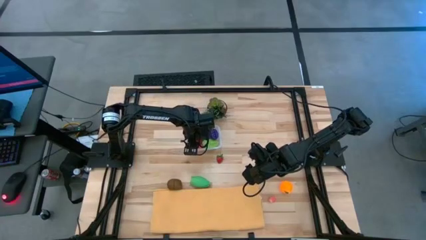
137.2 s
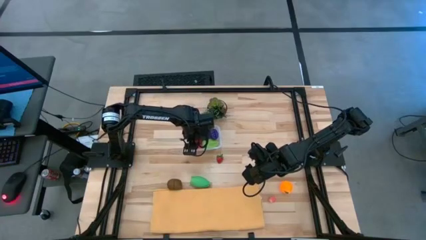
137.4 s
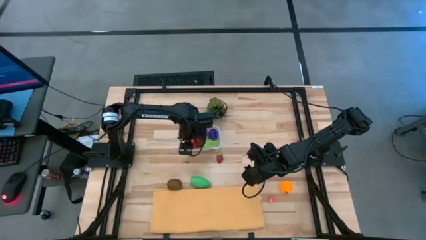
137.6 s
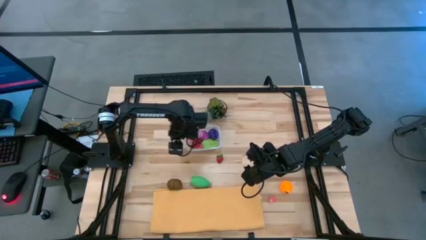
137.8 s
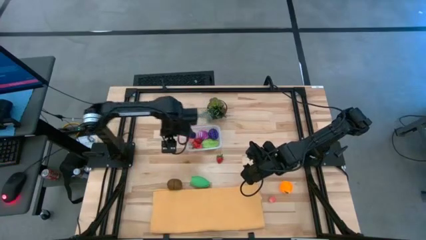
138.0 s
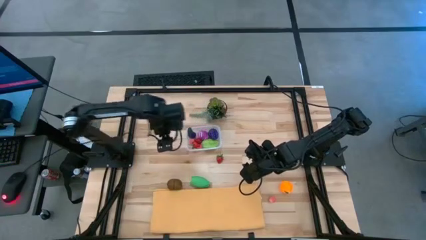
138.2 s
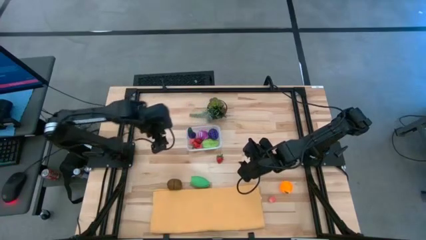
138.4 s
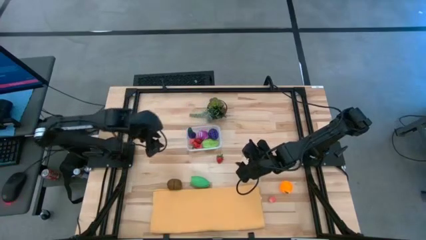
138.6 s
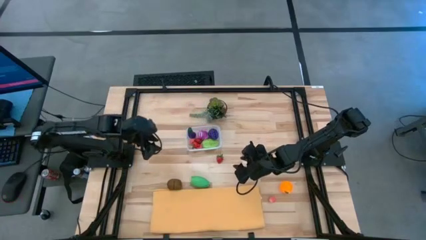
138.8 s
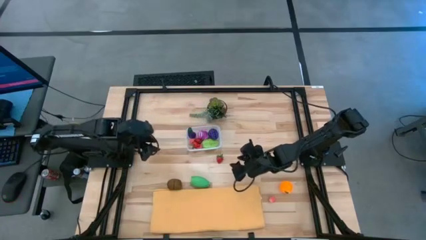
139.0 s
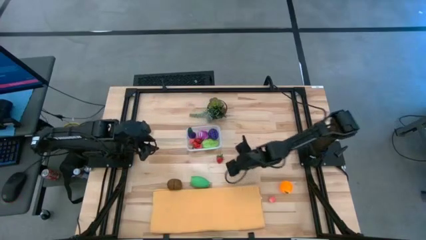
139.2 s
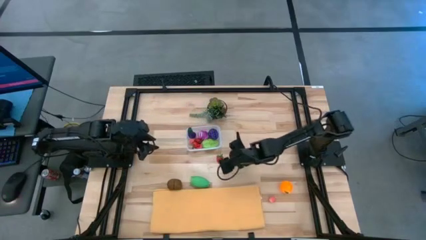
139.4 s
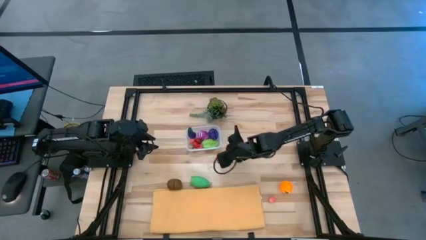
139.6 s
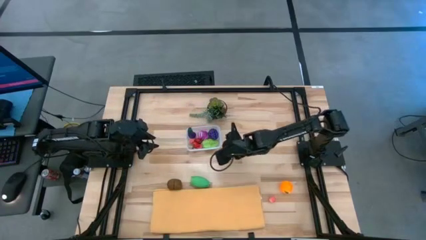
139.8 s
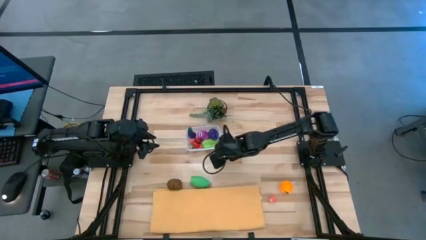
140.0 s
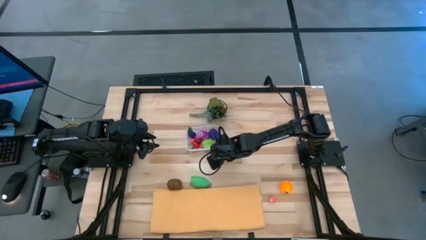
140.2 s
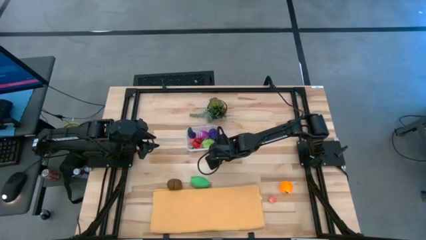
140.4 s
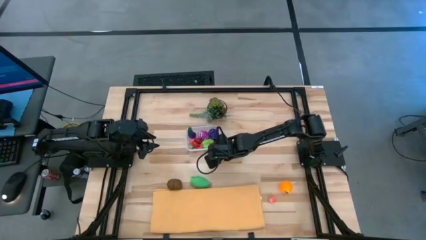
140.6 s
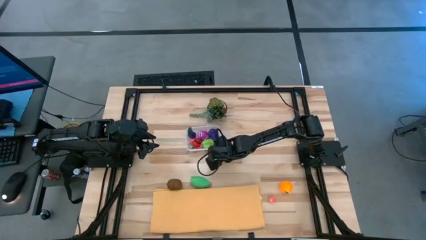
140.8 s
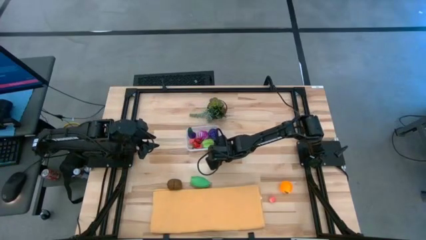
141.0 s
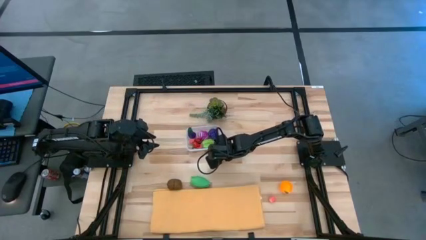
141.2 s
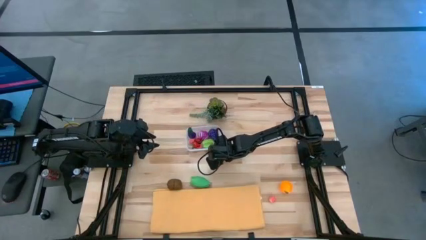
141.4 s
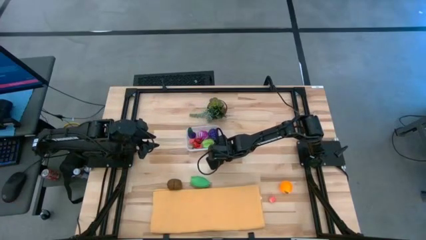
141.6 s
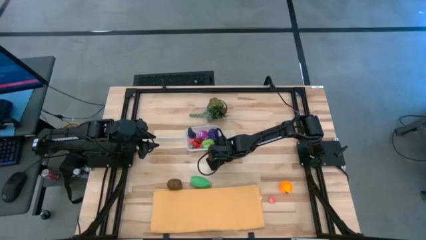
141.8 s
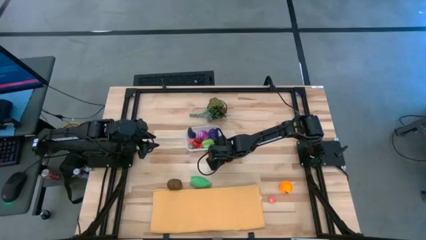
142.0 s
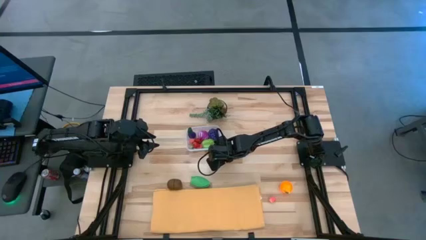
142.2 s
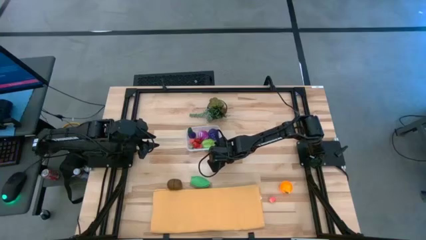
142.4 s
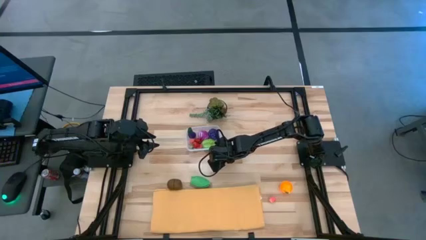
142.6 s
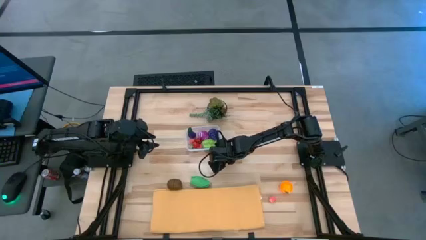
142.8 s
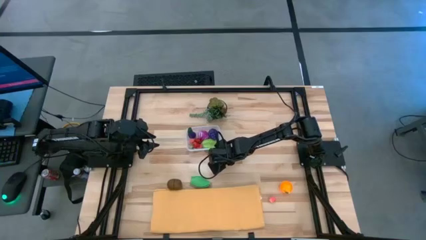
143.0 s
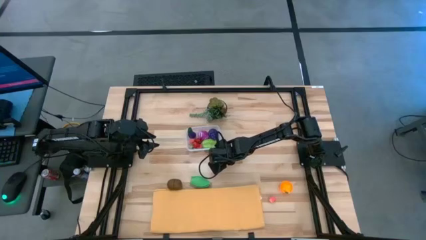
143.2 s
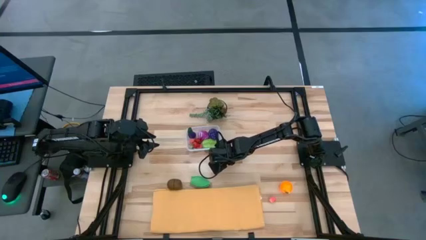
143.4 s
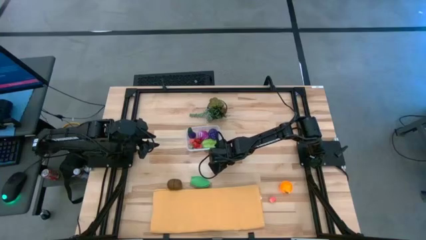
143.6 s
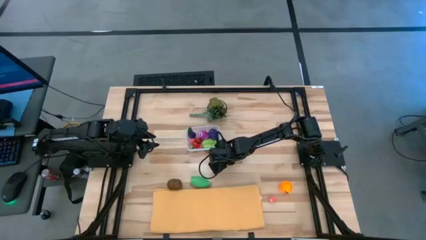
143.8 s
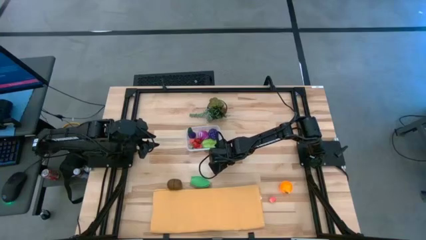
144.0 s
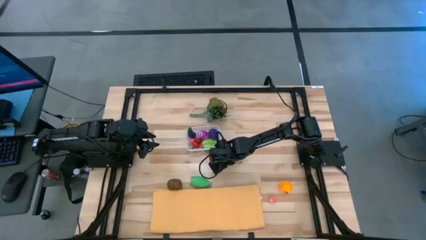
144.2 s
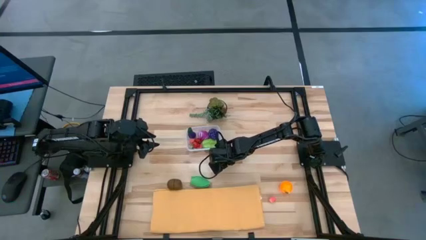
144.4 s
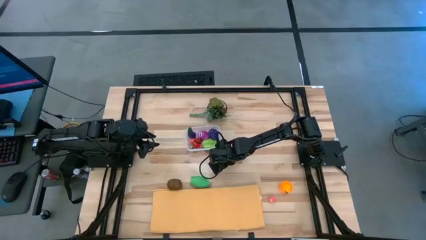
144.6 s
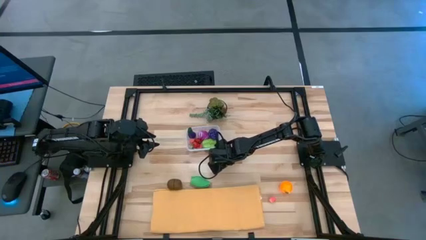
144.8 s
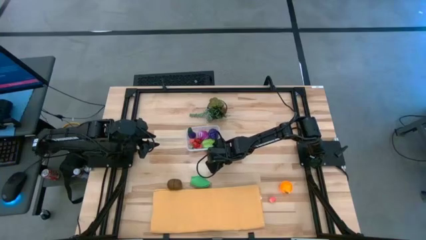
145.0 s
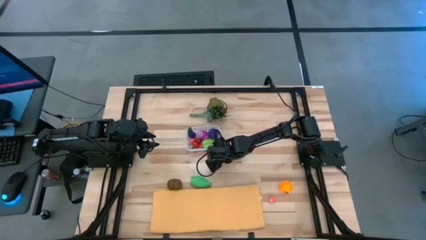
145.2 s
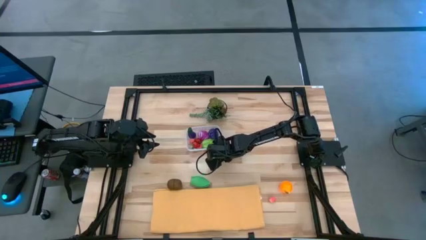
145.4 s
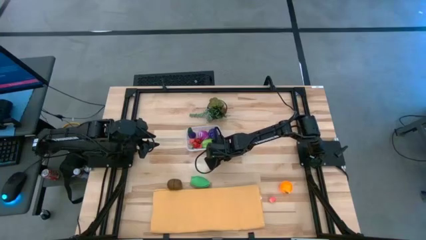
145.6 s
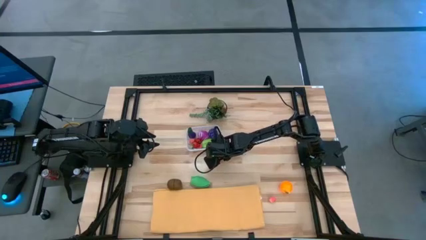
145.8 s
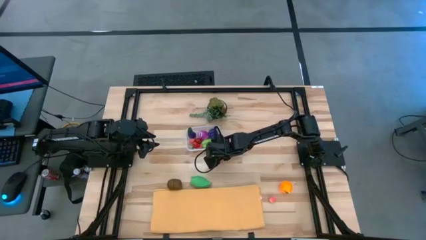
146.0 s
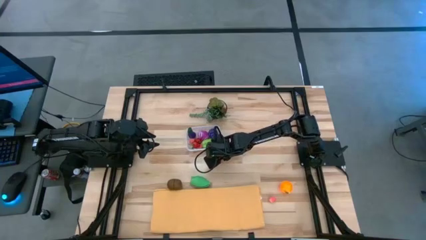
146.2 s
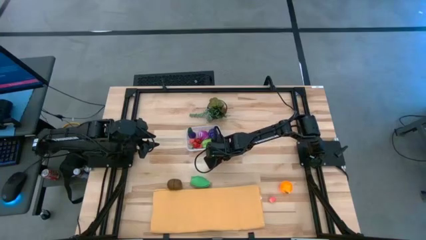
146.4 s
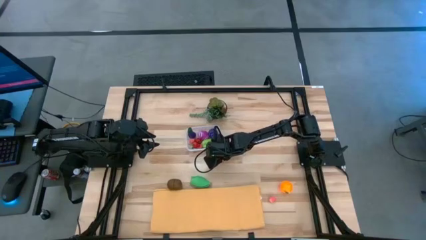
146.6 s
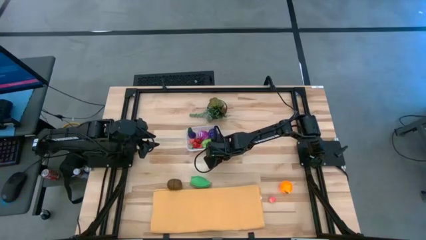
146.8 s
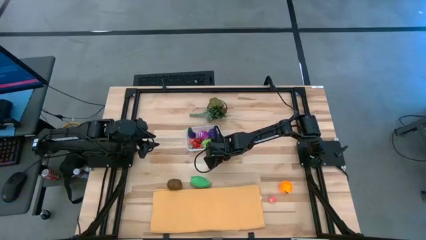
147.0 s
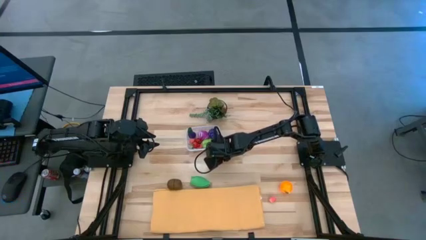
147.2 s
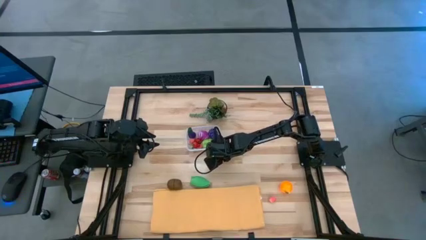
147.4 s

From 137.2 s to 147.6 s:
Task: Pick and placing Produce into tupperware
Put the red strawberry into the transparent bin

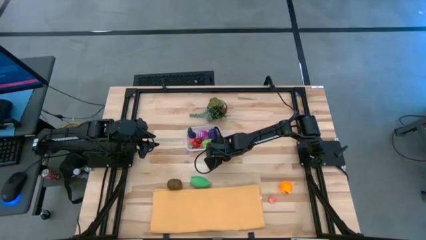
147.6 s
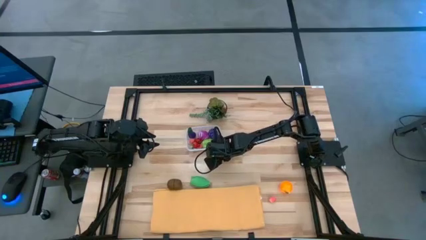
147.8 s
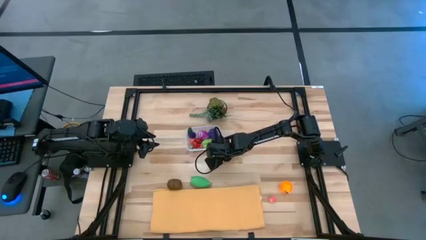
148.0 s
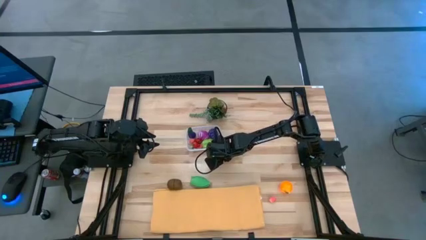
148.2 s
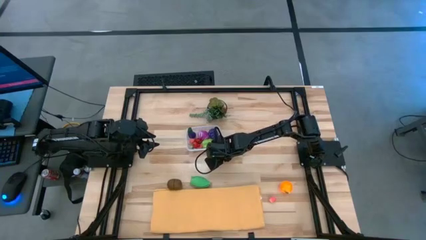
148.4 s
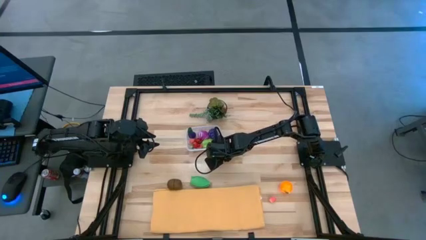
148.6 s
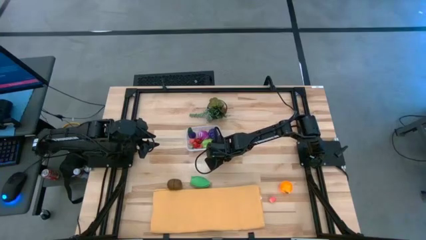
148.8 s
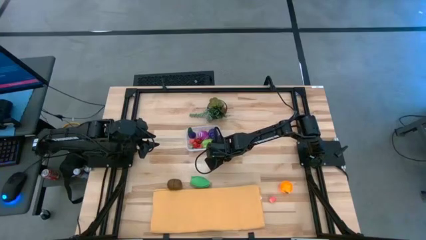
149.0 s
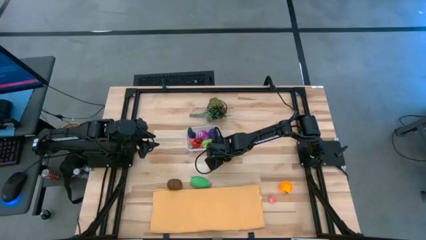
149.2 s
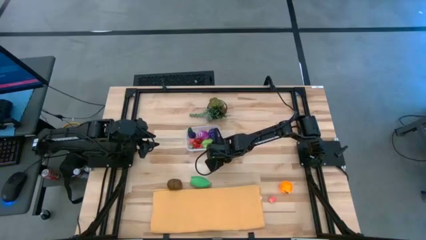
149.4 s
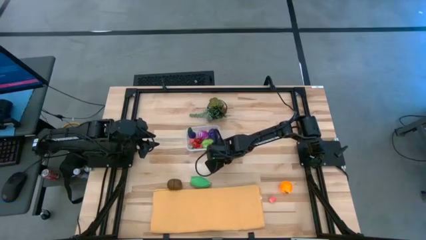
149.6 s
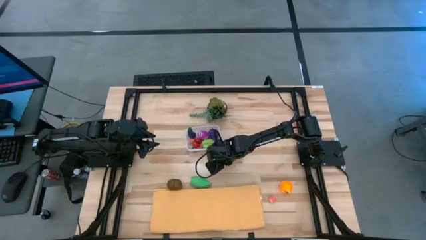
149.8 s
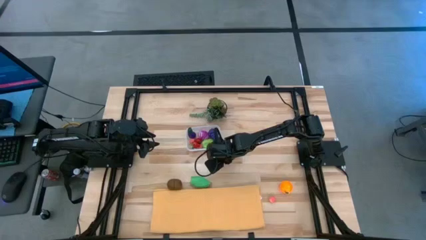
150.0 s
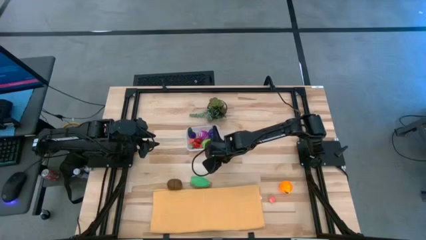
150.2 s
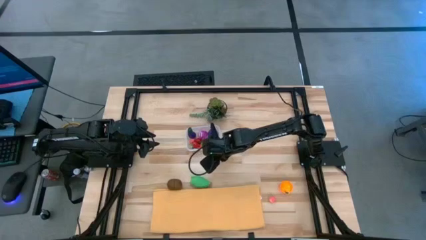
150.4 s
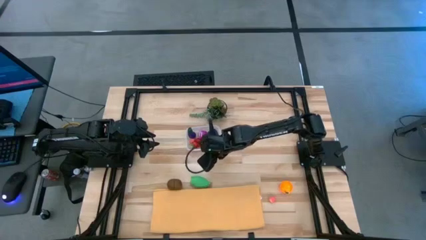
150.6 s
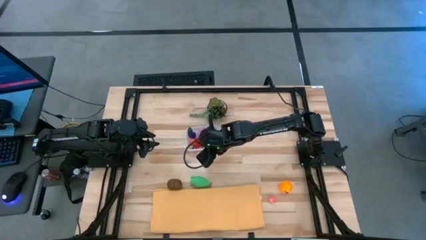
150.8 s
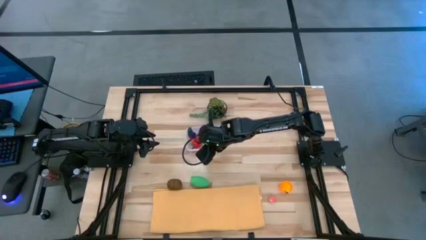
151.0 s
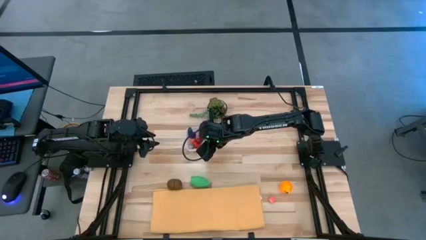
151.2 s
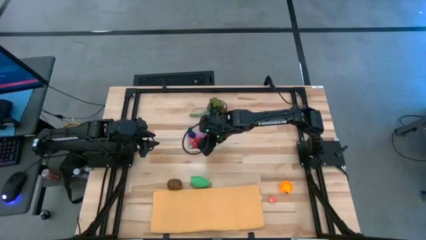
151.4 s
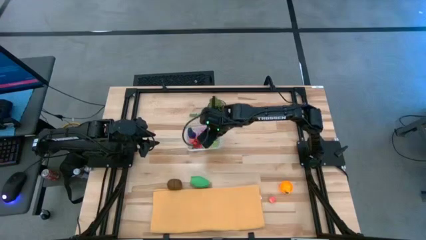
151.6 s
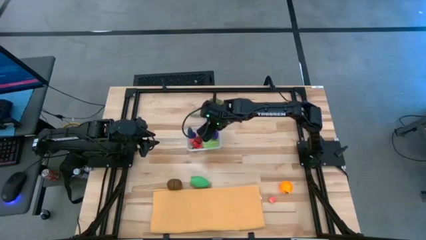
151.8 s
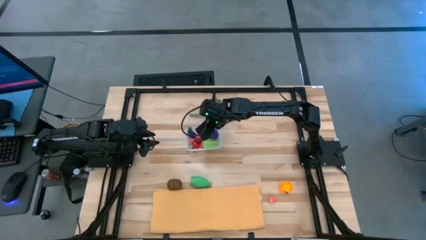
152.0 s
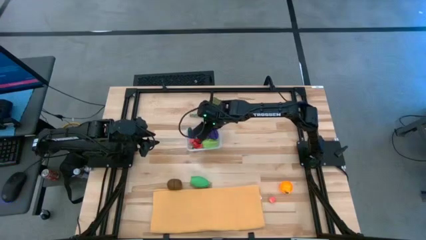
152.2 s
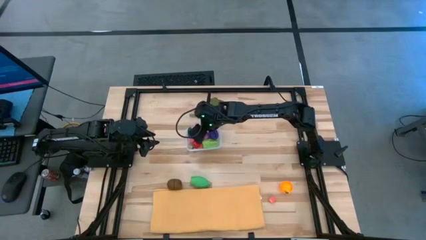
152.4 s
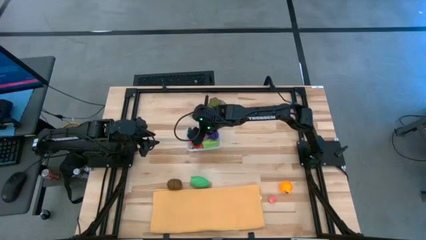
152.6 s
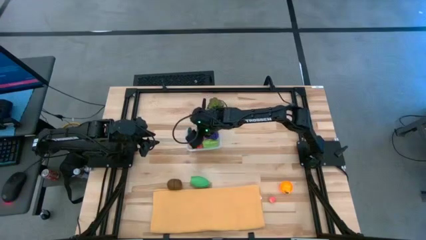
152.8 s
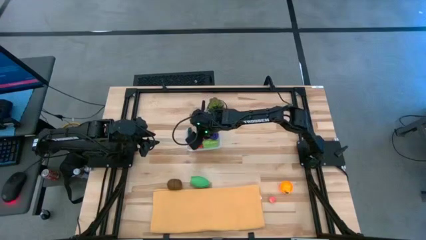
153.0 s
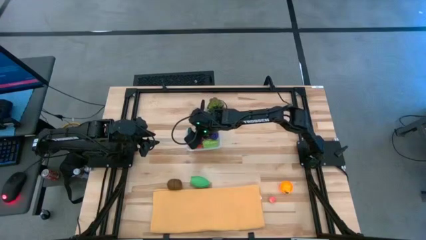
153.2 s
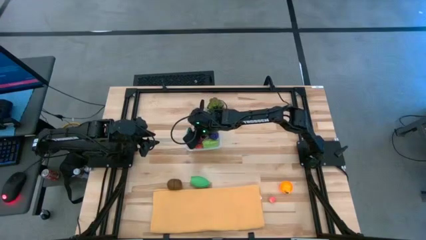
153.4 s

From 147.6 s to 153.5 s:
Put the red strawberry into the transparent bin
